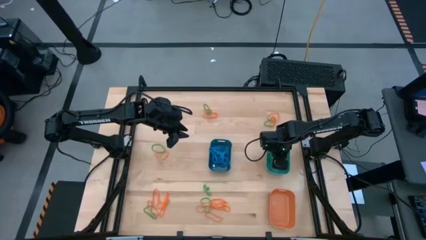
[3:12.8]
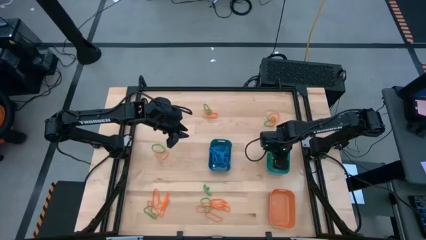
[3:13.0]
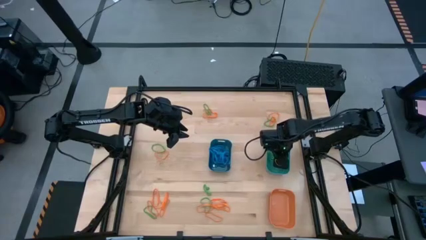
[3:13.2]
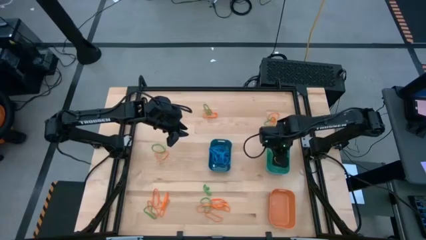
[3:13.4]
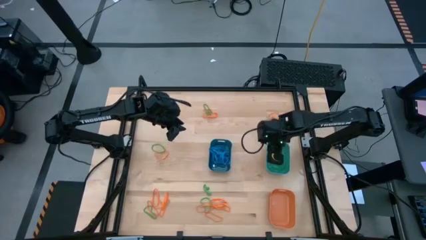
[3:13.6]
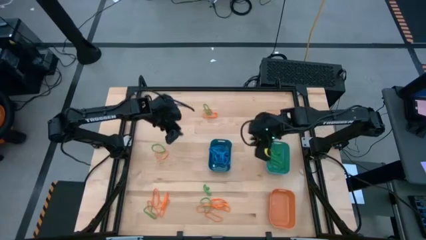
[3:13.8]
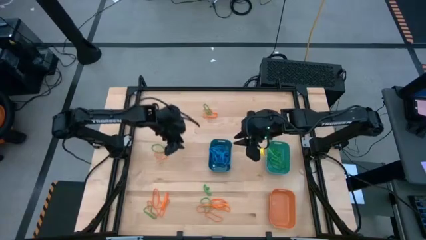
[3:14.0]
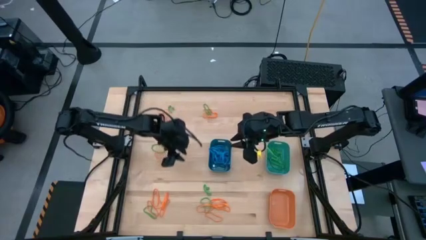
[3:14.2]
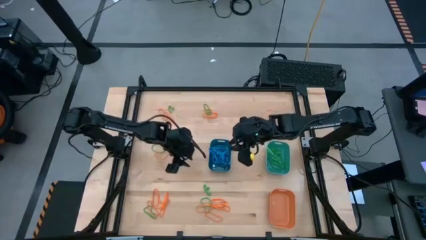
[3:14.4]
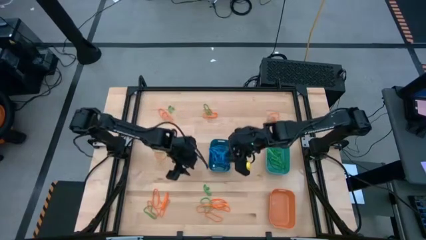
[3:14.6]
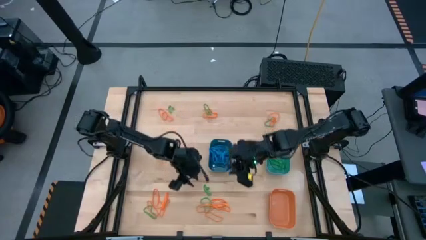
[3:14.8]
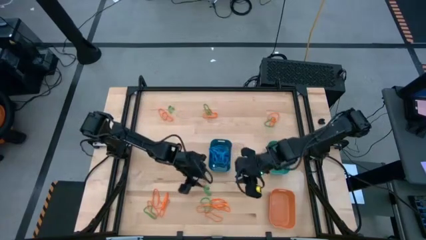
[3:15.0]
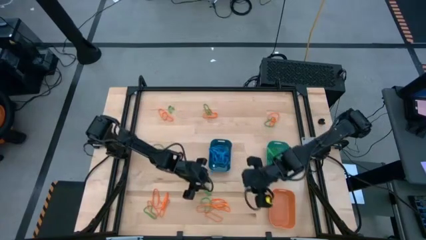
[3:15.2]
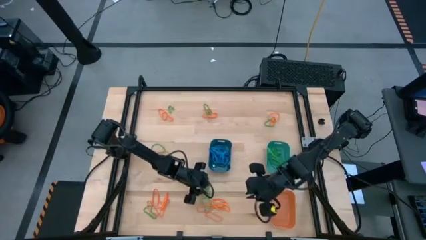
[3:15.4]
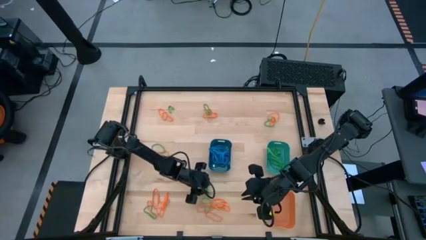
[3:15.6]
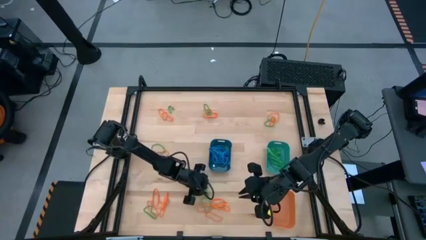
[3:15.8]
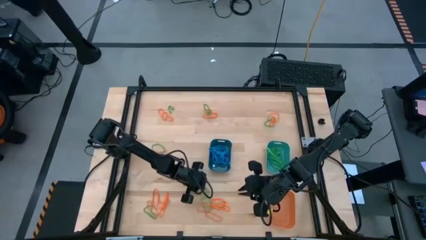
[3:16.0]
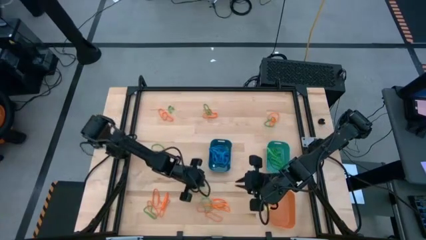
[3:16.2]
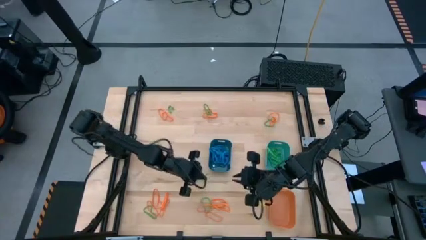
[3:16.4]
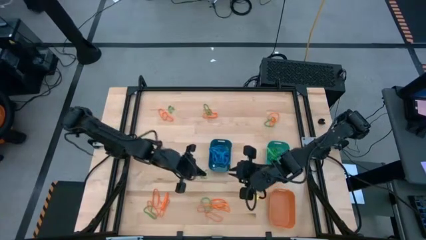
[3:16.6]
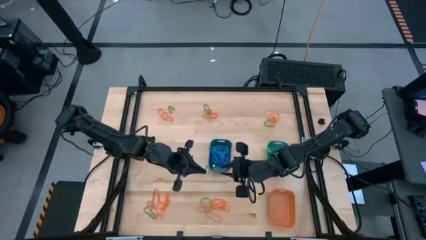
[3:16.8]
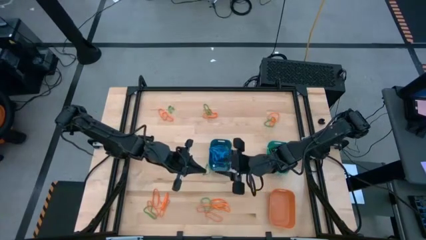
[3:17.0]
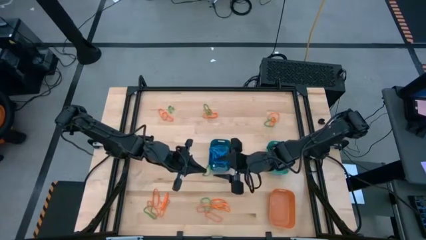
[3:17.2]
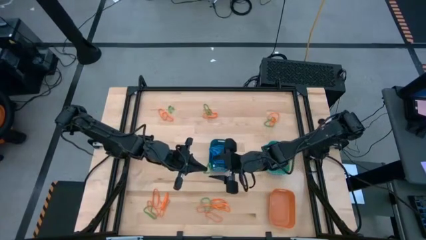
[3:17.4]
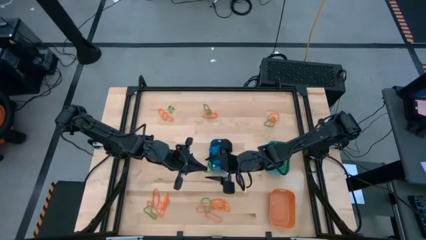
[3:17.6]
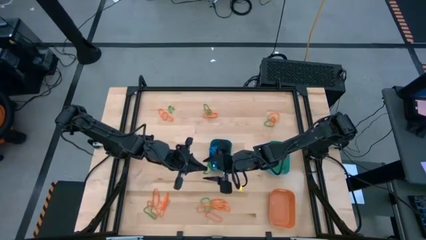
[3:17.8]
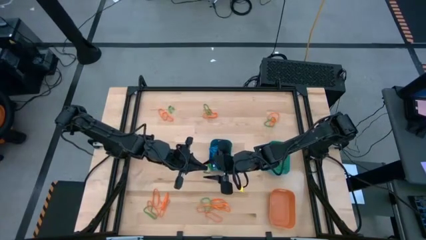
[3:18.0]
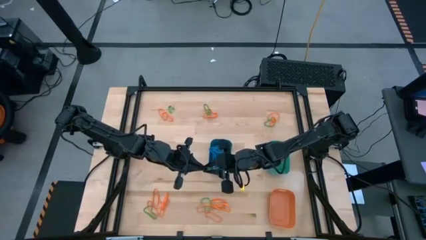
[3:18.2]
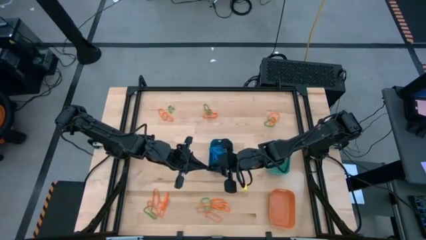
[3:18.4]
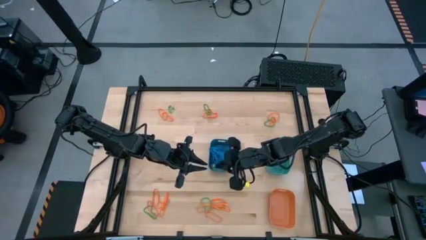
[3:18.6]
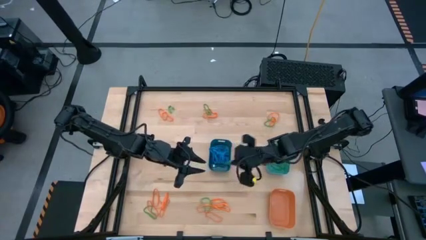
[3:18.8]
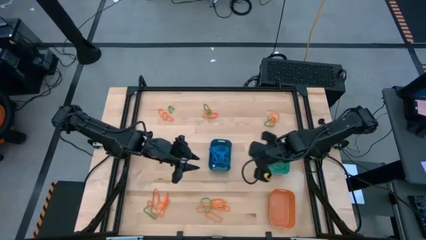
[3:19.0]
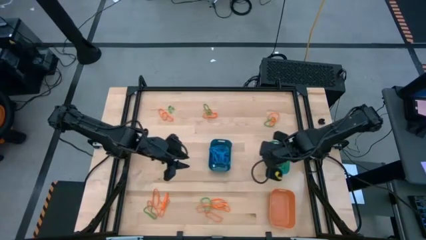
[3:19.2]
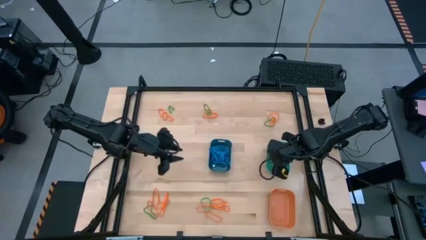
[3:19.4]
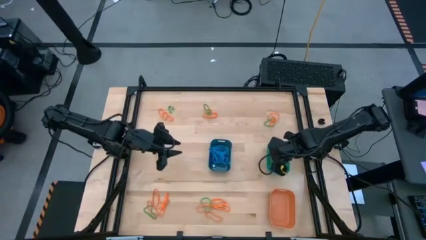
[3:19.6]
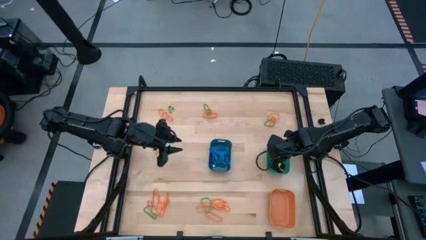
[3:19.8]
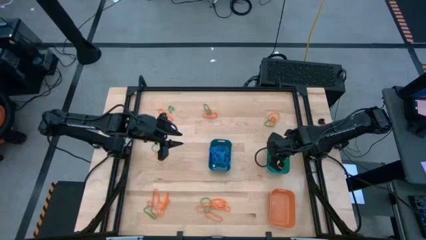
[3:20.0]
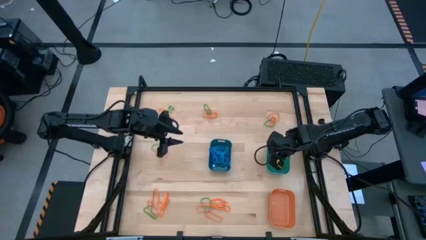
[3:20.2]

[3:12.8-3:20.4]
Task: Sort rubber bands into baskets
Put the green rubberband into the light blue bin

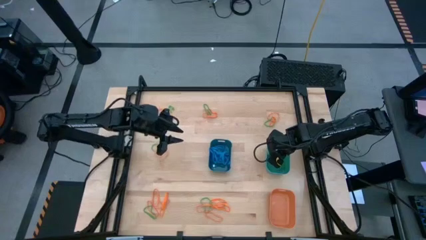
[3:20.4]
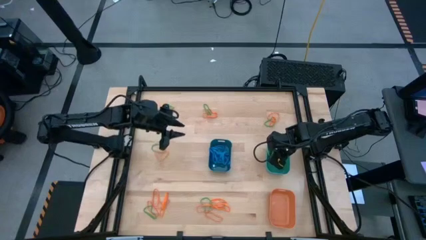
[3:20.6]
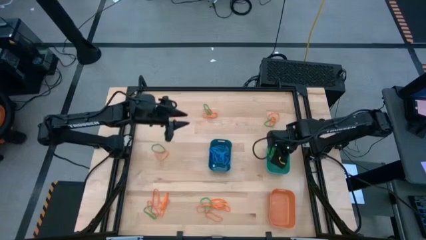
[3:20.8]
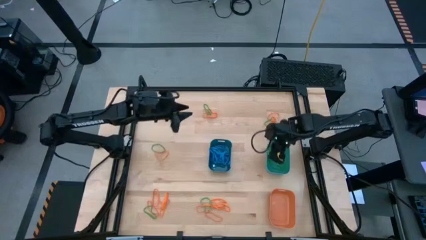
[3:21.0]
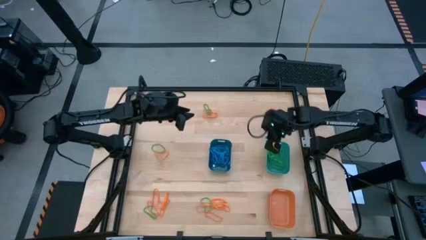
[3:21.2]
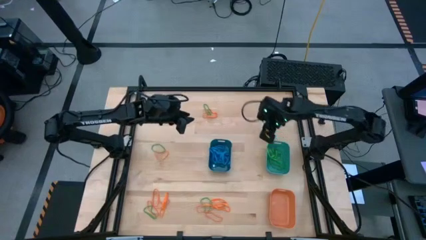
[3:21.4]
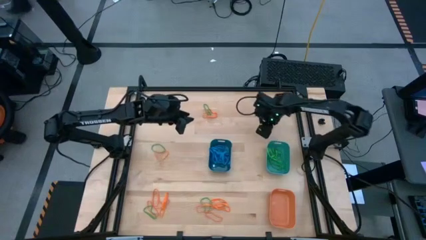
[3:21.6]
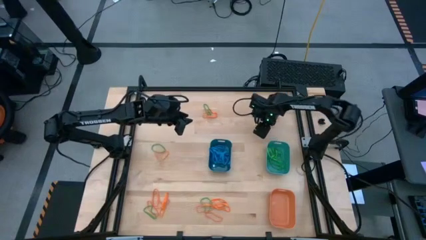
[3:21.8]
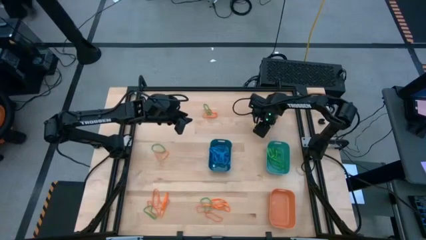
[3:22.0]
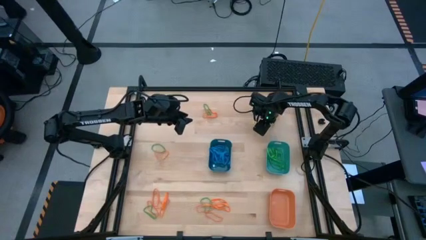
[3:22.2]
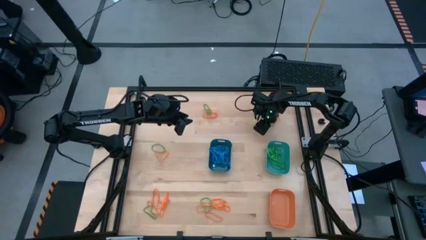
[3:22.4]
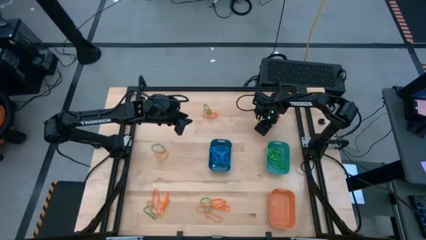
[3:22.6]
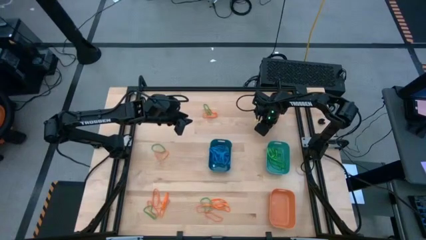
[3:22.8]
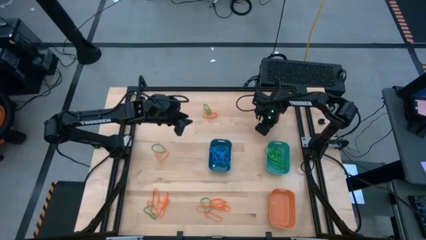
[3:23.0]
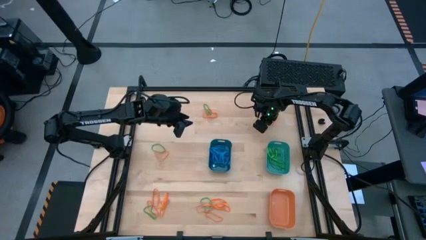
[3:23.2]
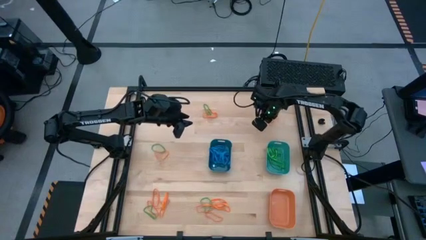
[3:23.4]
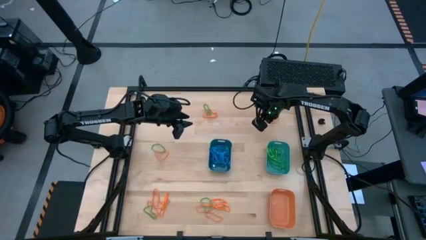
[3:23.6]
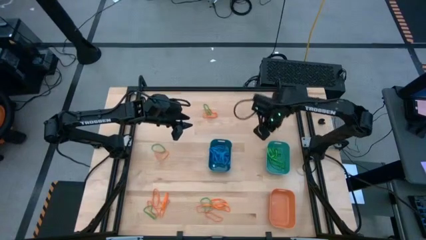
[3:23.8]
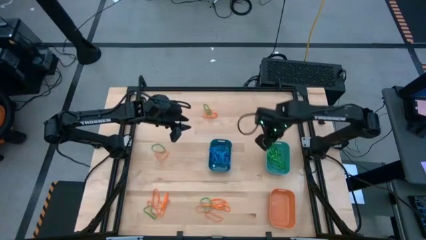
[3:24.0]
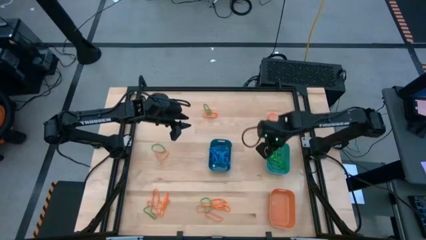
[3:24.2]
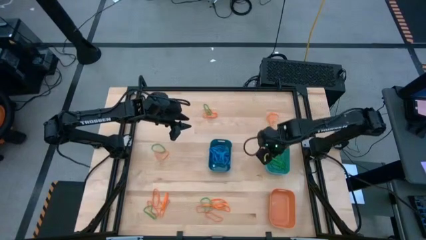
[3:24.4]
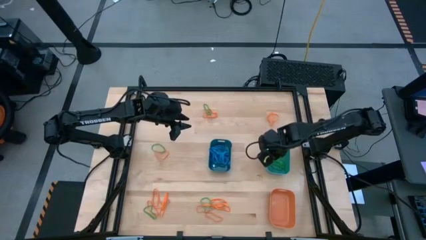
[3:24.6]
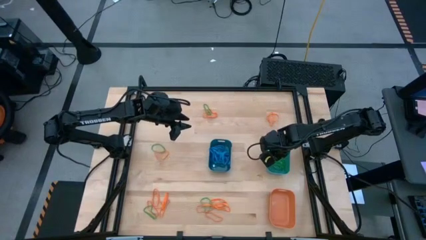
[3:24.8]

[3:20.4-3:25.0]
Put the green rubberband into the light blue bin

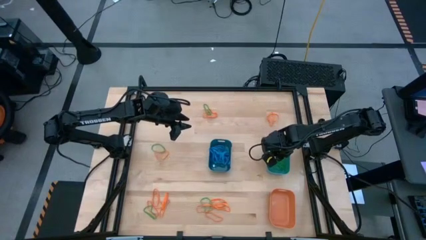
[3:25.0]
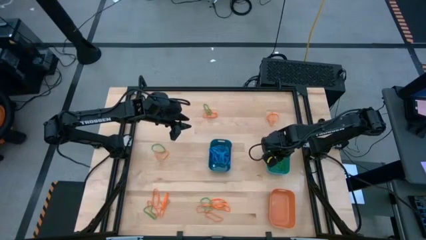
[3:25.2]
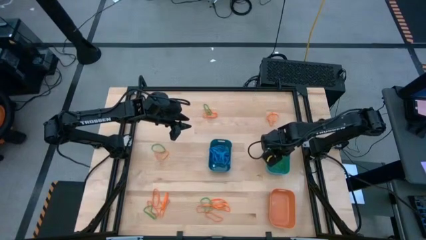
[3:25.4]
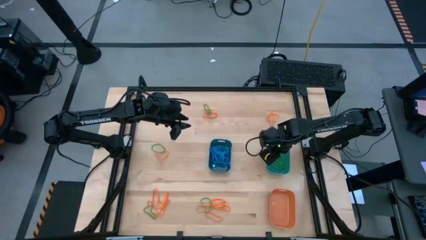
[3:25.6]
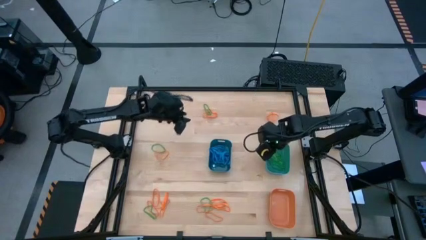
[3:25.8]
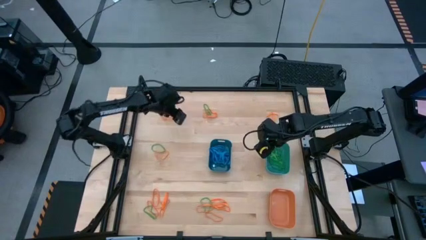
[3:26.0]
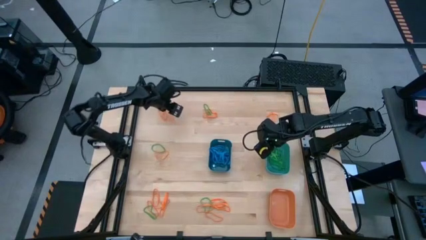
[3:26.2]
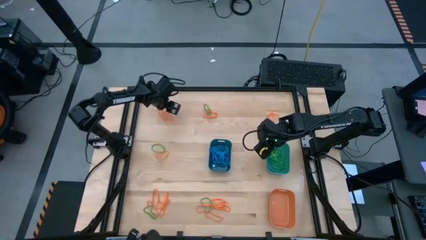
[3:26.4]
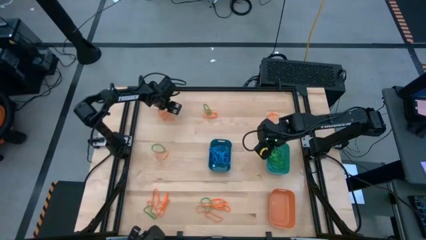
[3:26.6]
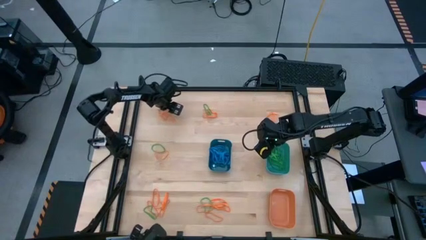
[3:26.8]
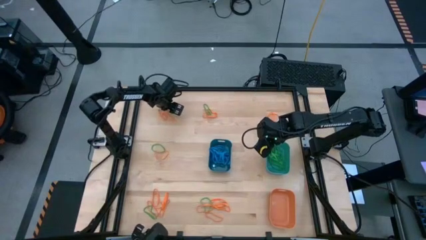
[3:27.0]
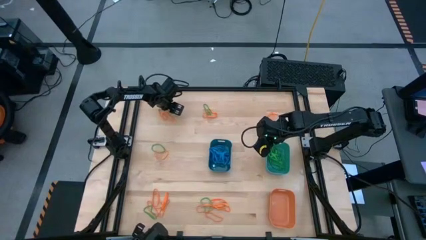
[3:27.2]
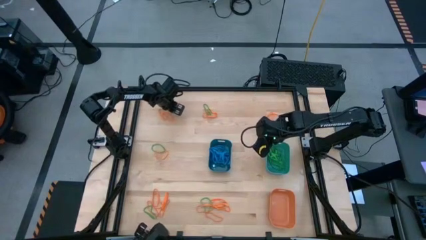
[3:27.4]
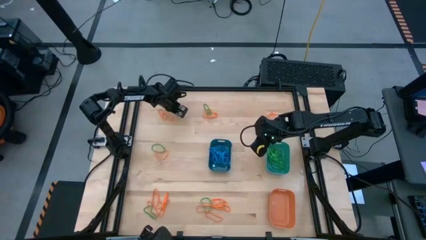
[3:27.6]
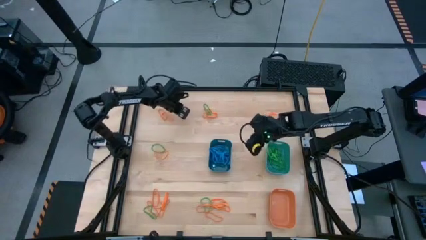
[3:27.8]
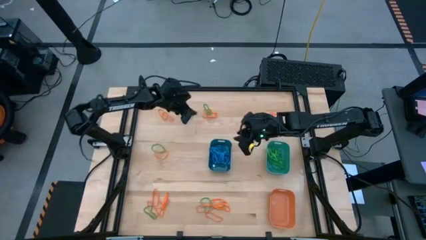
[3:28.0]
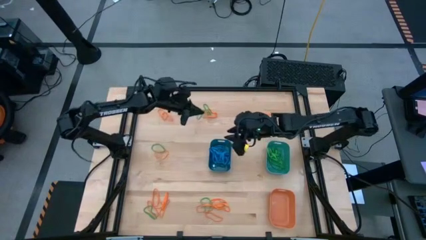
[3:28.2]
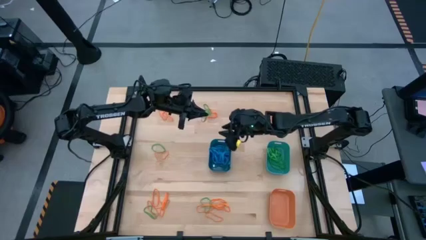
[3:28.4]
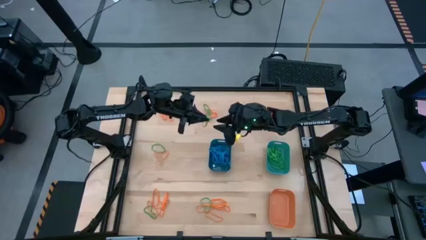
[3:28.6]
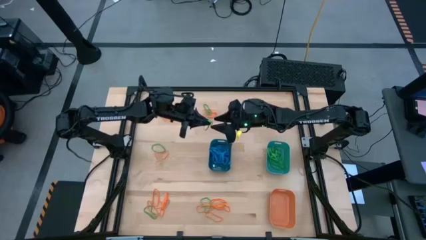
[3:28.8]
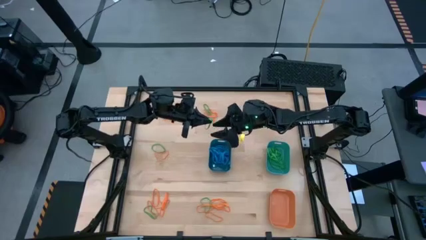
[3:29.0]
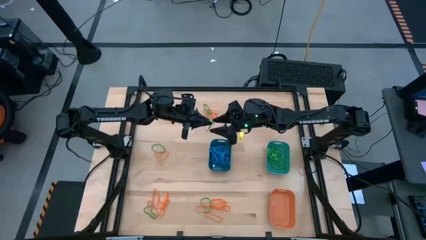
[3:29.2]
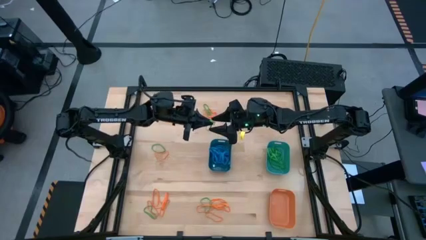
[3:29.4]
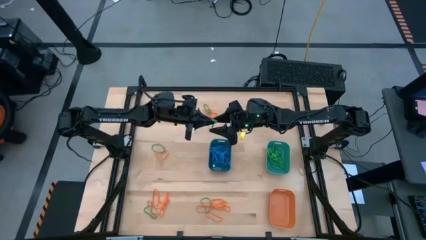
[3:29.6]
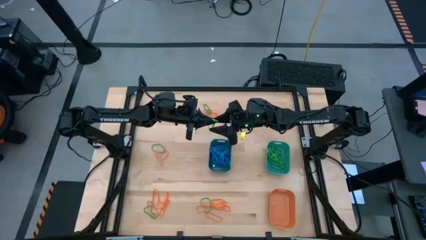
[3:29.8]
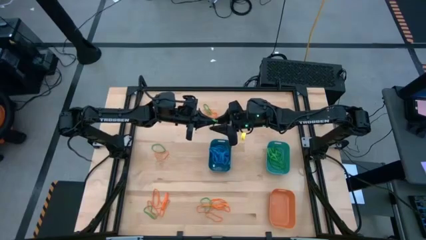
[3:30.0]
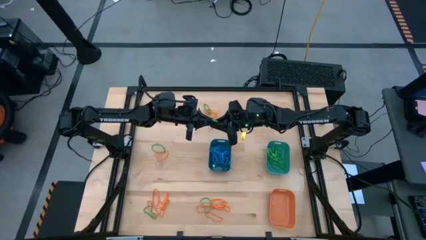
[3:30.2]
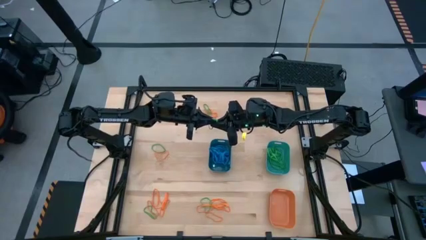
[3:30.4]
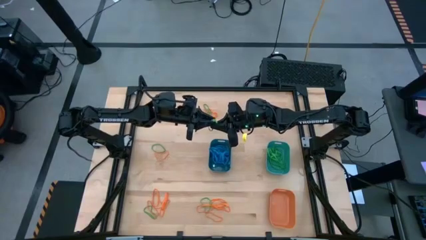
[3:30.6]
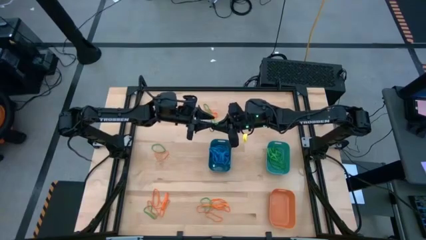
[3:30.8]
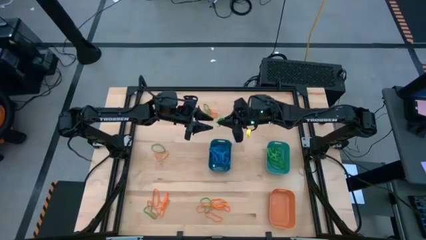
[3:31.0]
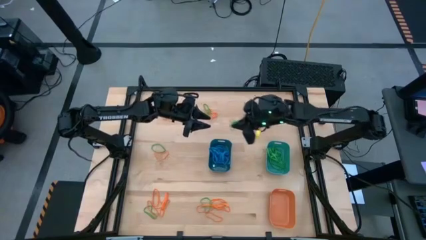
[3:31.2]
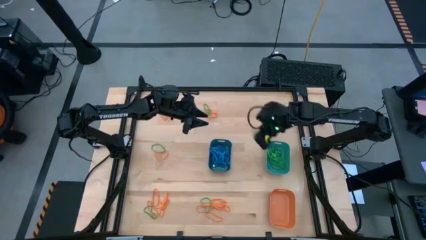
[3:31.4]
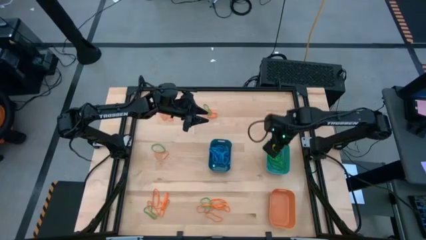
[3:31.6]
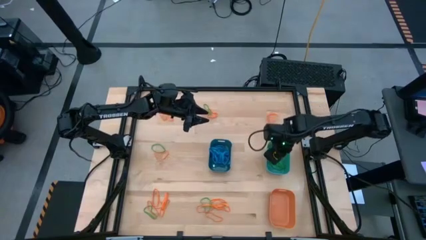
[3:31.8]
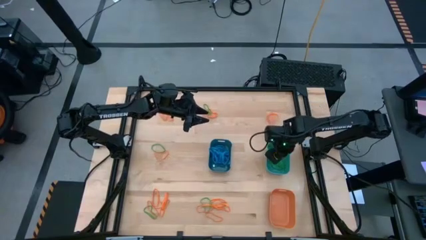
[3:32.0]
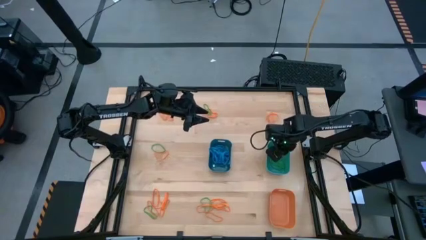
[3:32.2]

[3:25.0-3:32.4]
Put the green rubberband into the light blue bin
